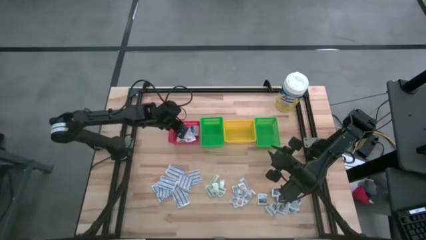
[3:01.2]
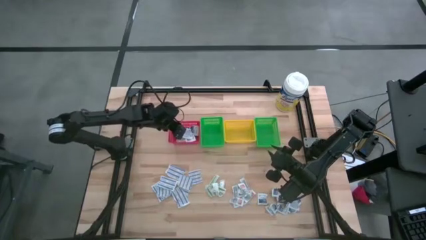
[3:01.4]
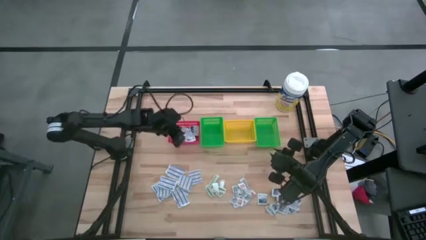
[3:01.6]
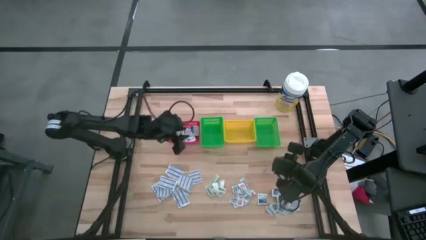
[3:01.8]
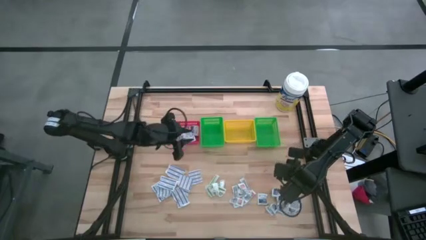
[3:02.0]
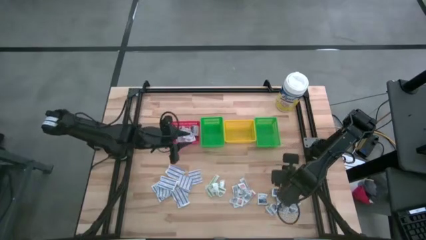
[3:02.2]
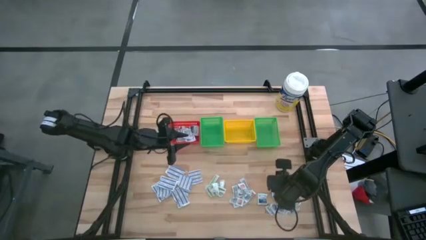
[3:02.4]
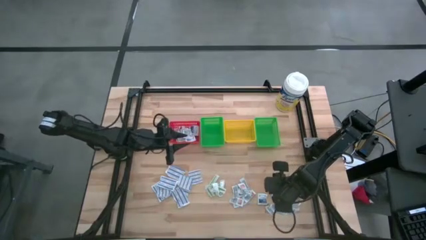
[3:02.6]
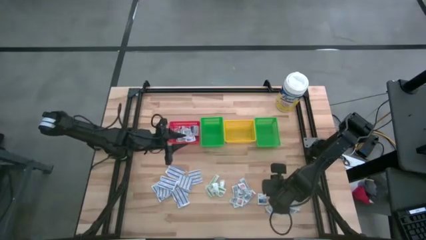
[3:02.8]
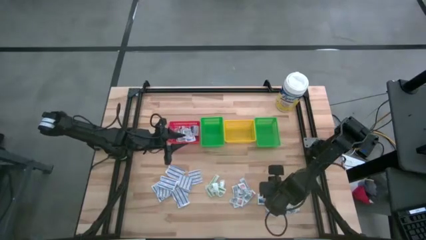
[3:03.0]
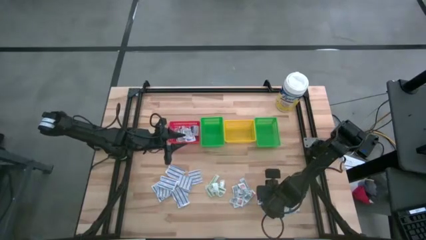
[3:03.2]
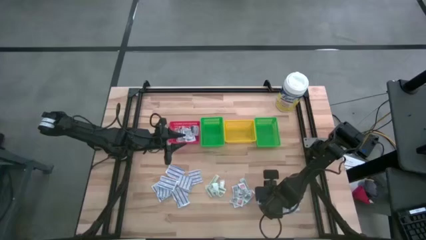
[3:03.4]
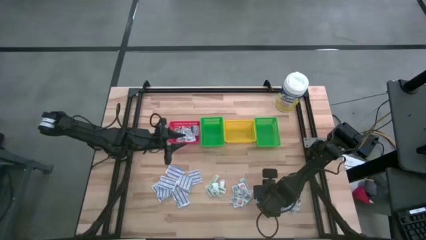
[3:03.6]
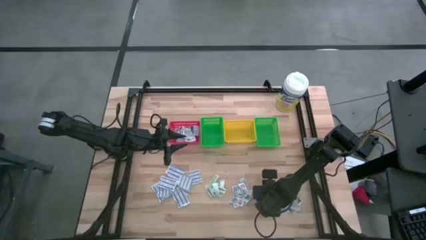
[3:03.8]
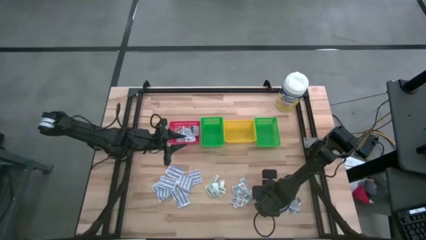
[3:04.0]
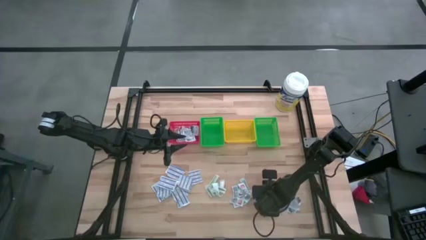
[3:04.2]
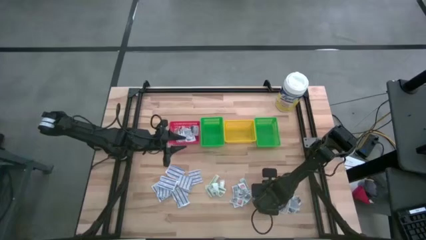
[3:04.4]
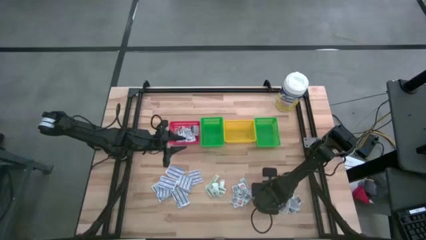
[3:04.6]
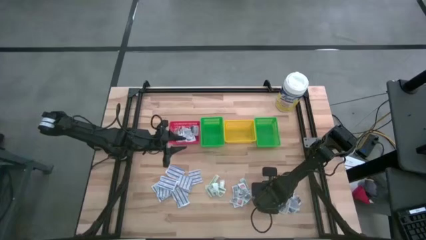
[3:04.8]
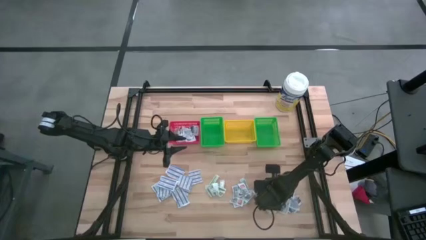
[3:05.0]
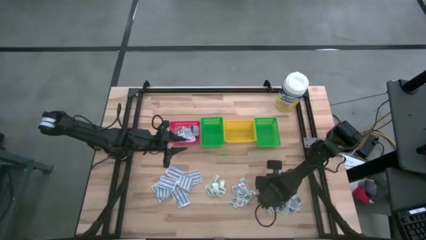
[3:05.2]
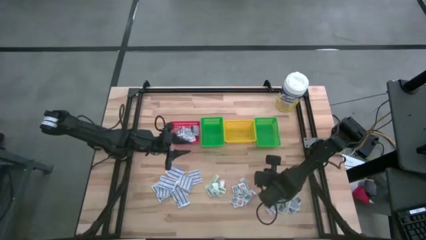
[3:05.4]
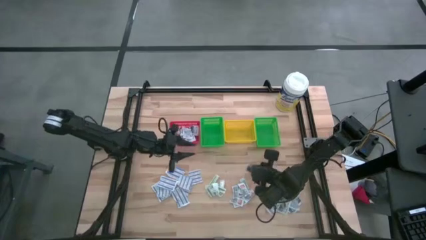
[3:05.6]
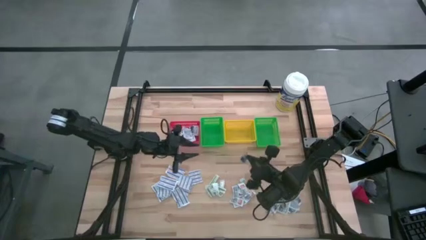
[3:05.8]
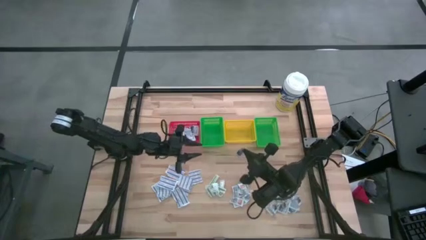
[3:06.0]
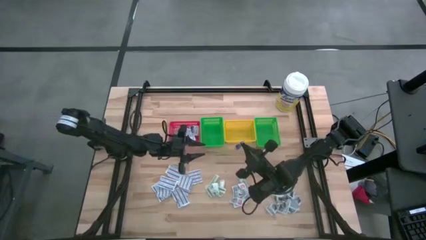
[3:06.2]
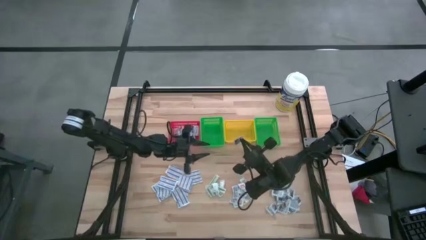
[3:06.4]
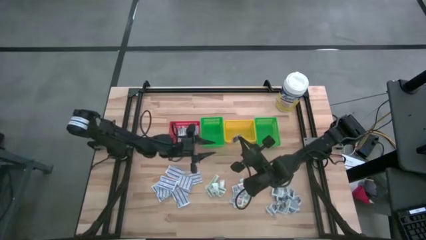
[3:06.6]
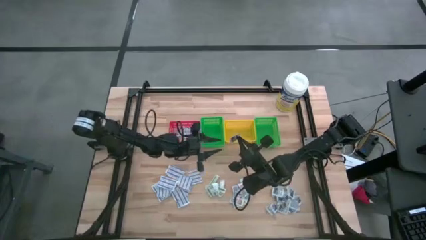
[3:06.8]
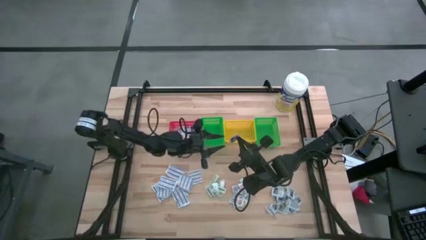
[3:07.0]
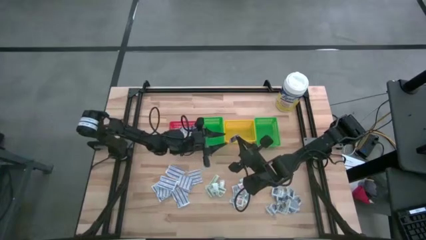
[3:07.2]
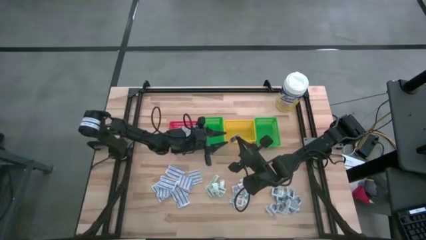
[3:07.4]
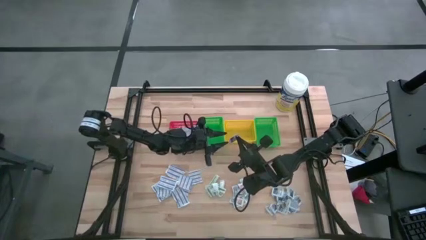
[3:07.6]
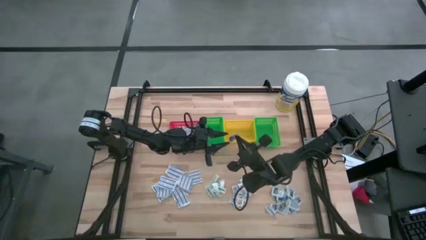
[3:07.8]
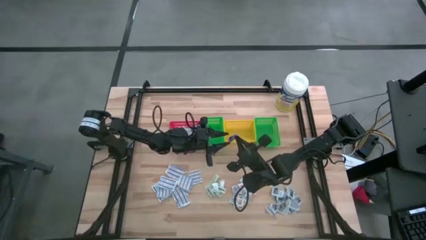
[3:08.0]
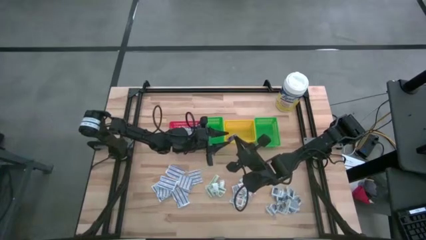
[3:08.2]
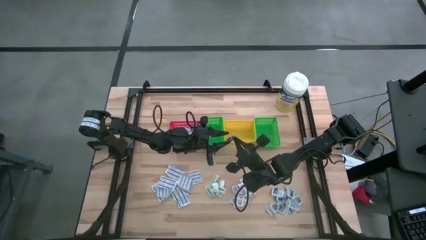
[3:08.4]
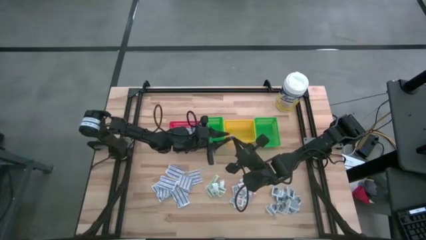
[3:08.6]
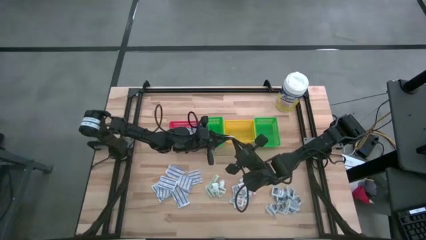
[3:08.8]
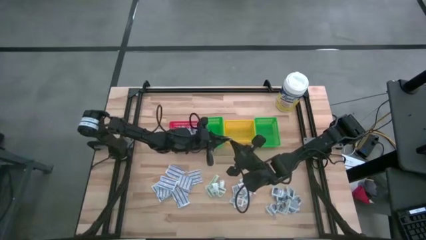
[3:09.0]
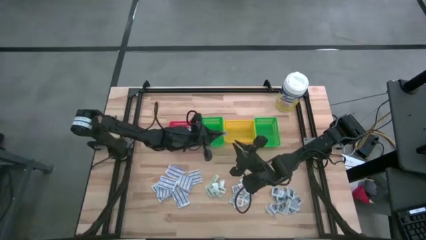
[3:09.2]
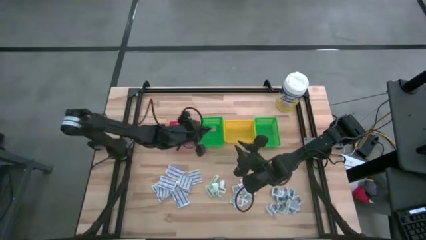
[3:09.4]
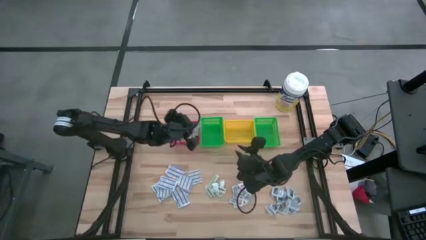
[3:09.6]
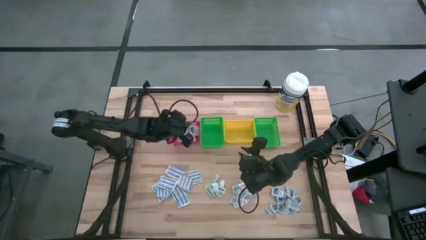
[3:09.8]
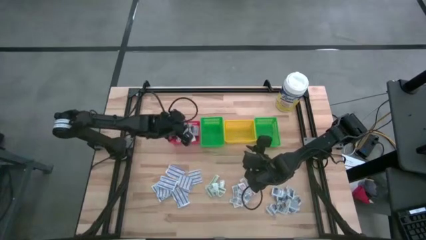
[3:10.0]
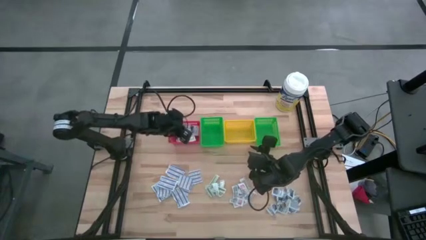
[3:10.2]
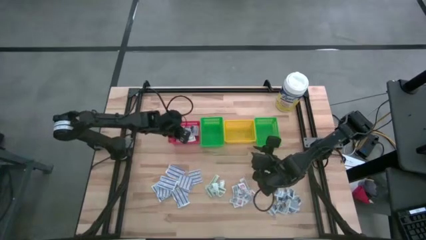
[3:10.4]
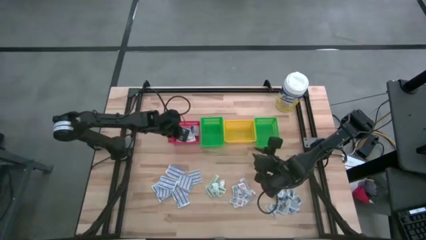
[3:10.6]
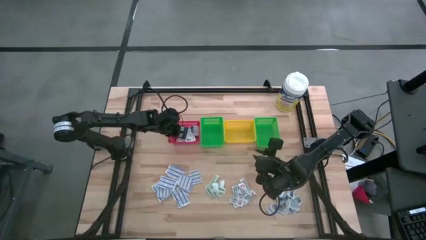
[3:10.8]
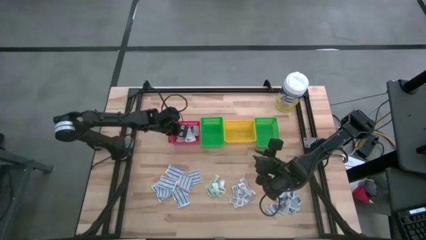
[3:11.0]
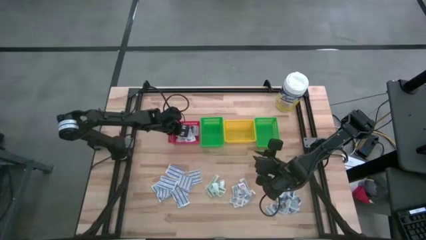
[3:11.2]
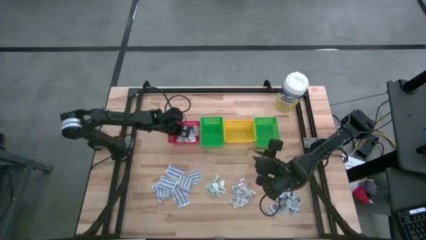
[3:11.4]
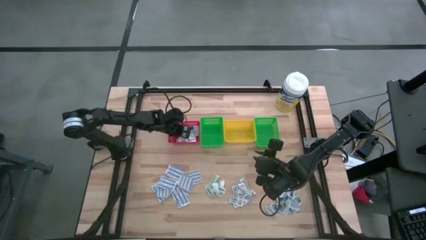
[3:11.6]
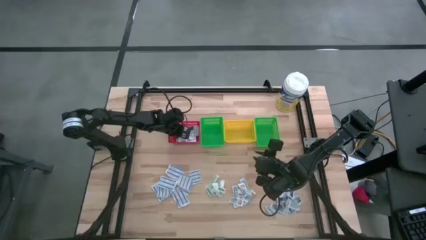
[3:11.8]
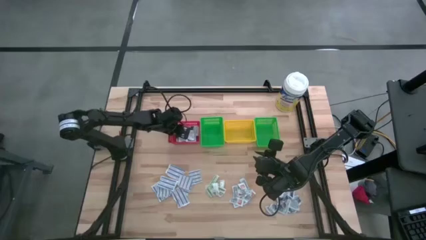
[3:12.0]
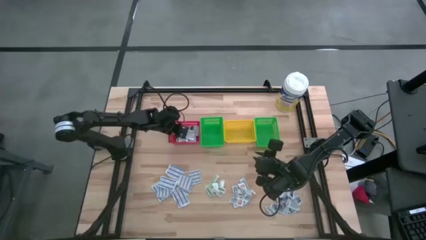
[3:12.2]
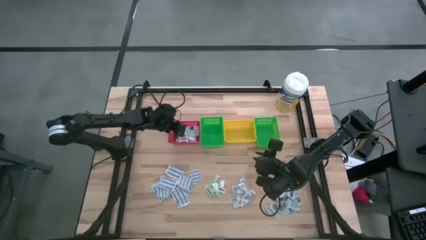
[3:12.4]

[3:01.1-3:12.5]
Task: Pick & Place First Aid Supplies
Put the alcohol pad into the red basket
